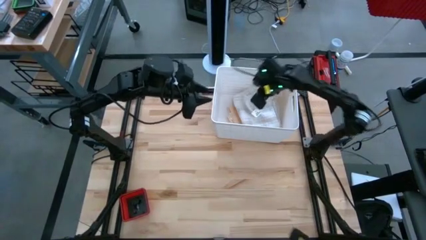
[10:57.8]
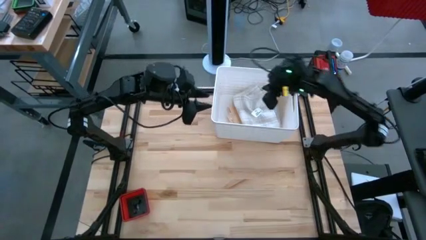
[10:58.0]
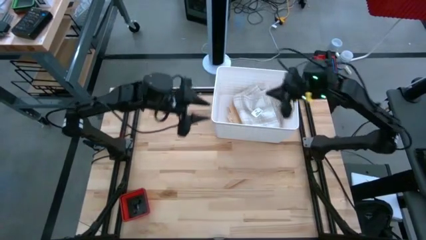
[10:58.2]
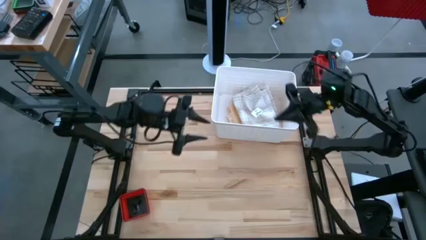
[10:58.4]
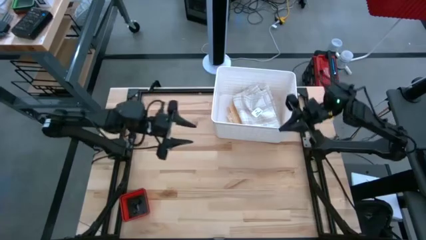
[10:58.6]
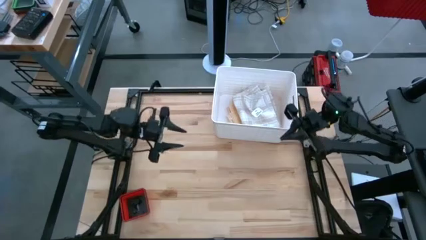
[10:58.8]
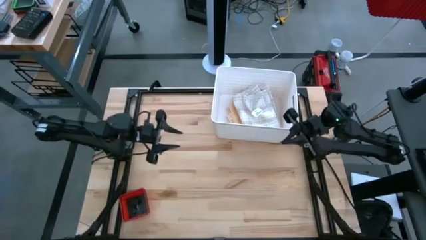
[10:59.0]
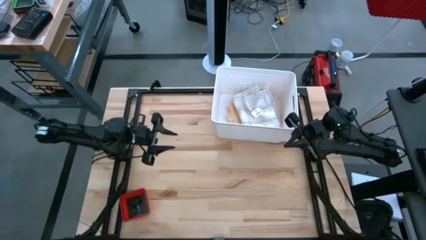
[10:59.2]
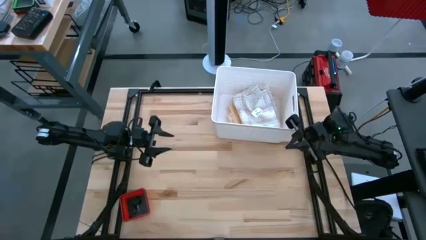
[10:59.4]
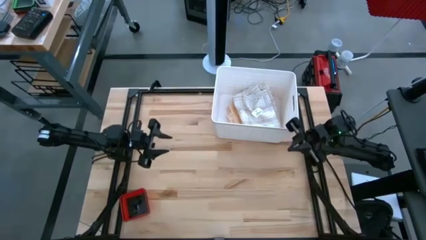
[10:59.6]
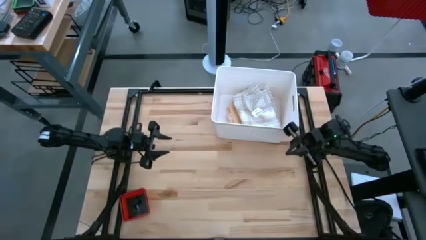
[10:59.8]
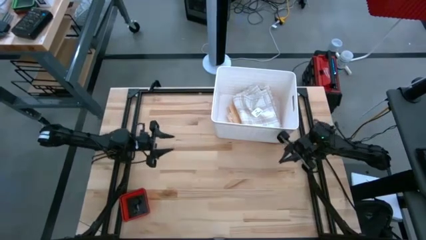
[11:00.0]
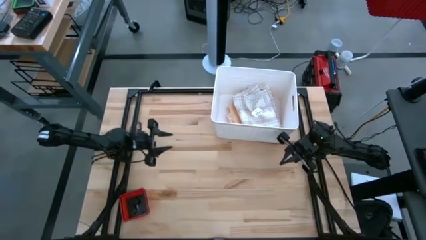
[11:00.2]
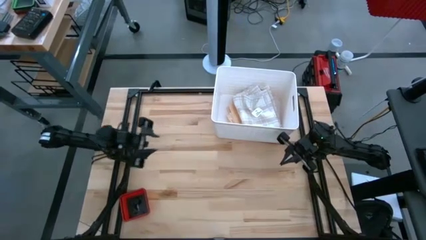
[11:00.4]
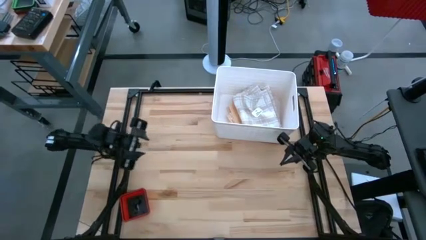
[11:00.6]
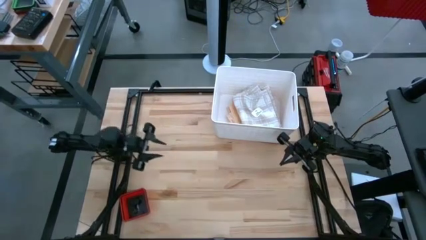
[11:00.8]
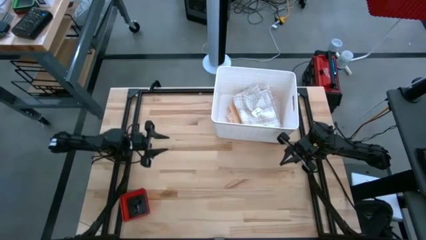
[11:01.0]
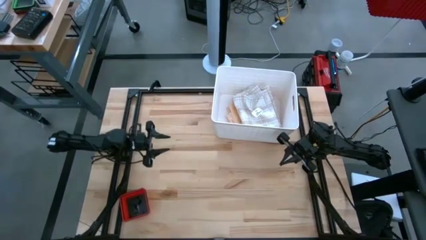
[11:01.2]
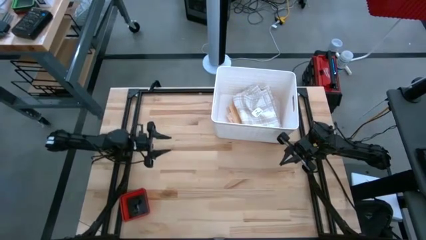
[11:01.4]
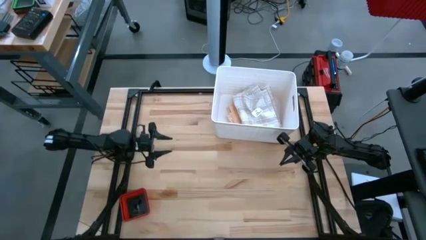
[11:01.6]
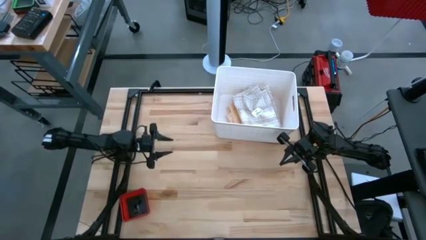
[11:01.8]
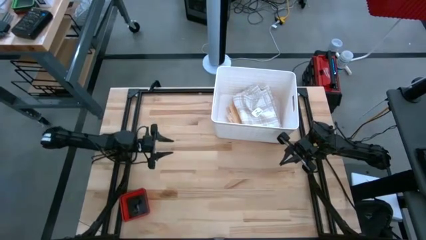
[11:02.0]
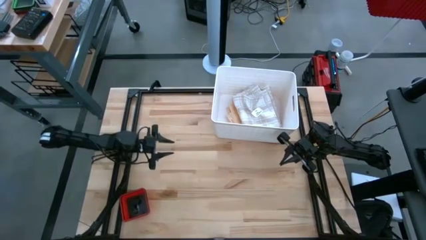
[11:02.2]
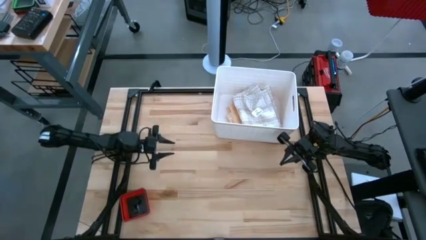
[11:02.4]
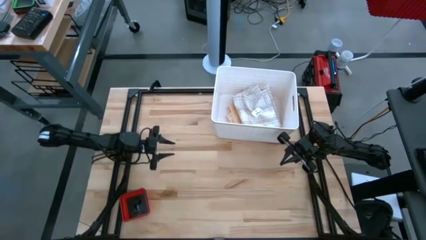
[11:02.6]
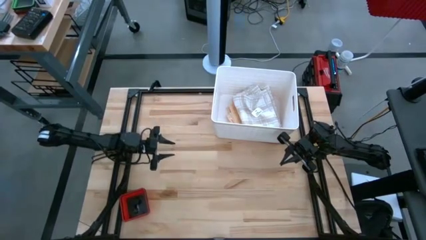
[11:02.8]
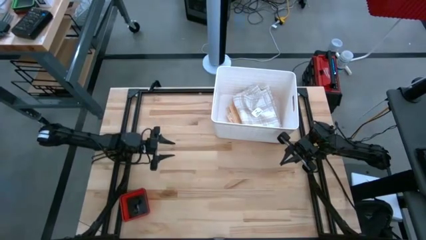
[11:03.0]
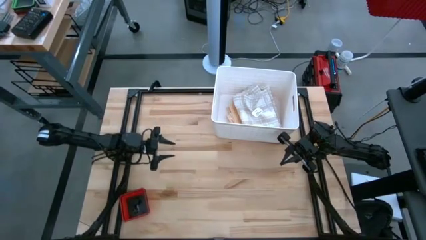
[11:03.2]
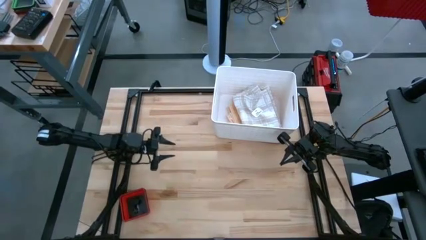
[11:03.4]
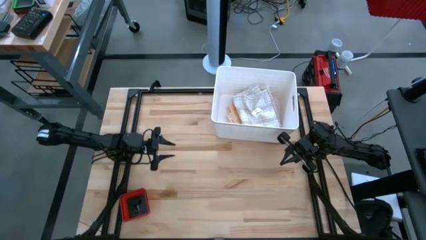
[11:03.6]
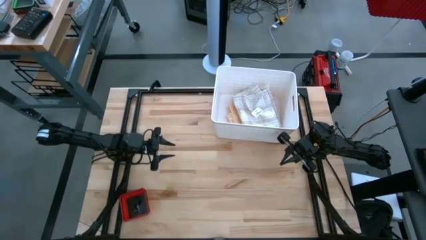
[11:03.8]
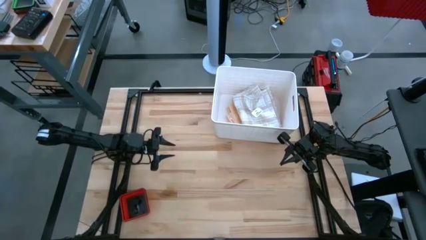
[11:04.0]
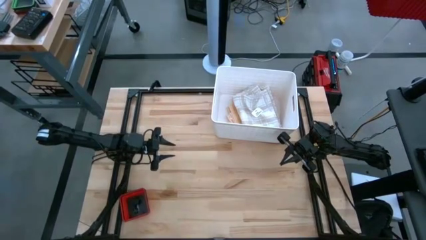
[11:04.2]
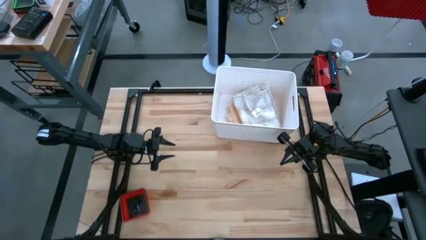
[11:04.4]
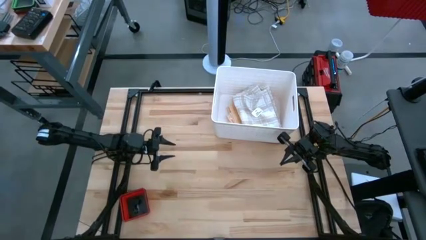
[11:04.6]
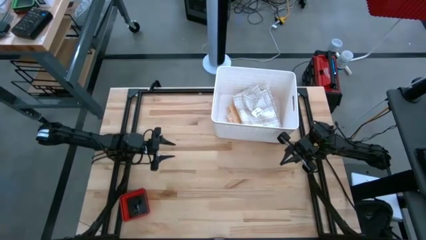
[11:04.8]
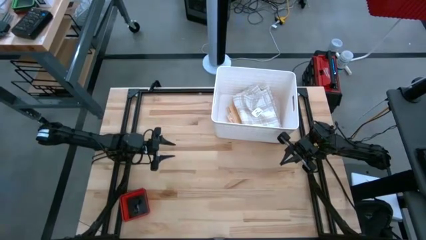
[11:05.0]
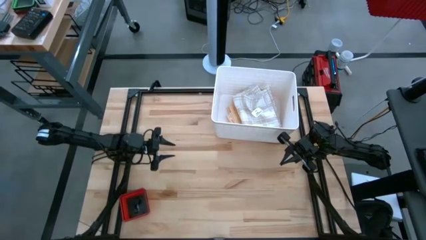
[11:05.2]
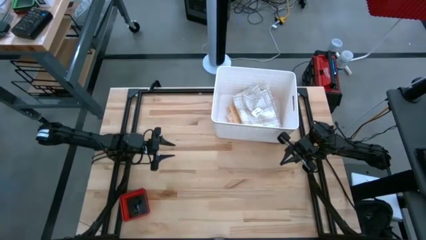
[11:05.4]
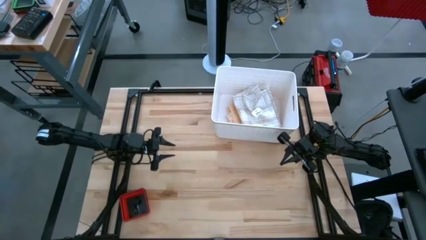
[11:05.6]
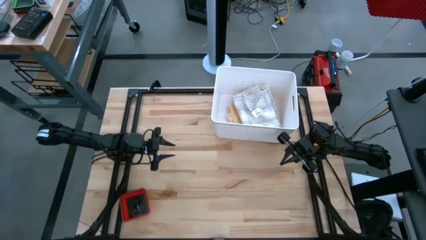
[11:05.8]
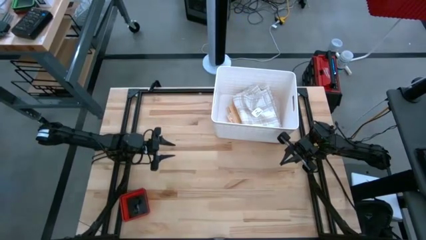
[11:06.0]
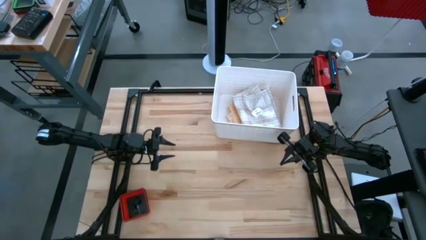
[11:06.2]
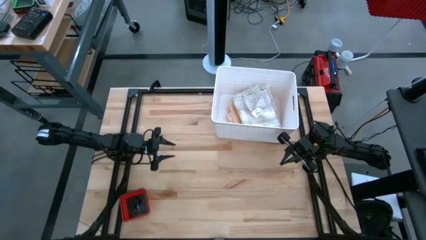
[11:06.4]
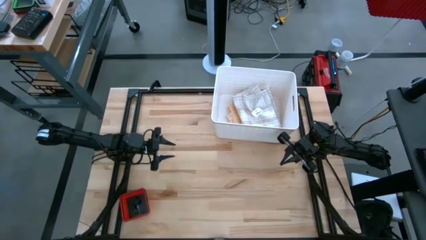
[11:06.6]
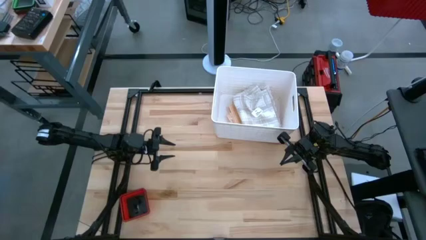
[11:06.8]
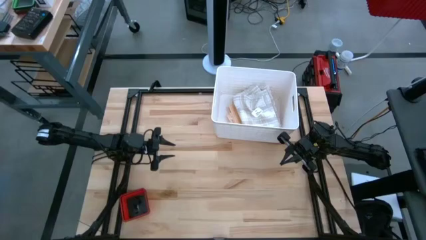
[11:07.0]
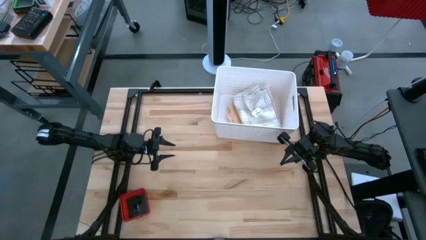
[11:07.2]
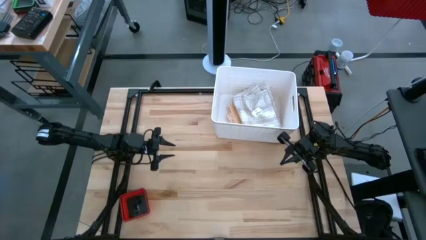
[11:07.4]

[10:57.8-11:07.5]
Task: Fold towel
Return to Home Position

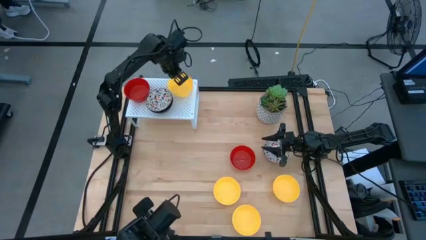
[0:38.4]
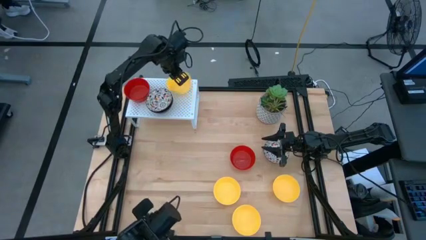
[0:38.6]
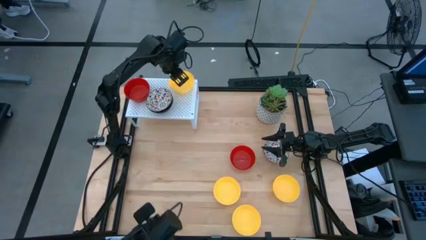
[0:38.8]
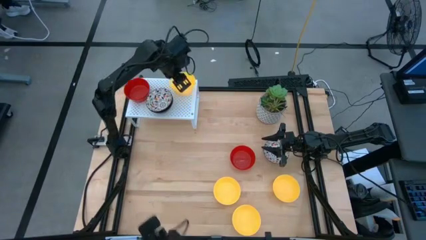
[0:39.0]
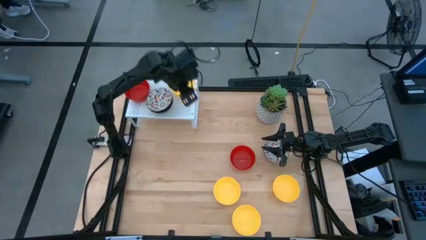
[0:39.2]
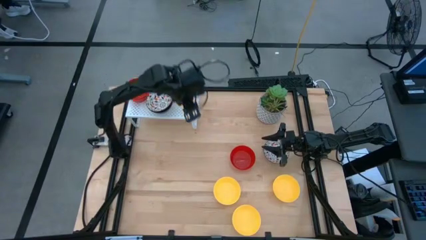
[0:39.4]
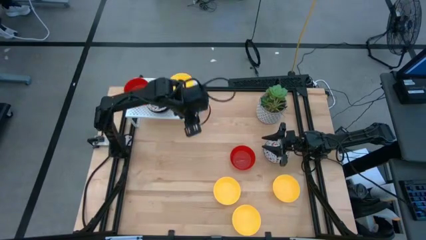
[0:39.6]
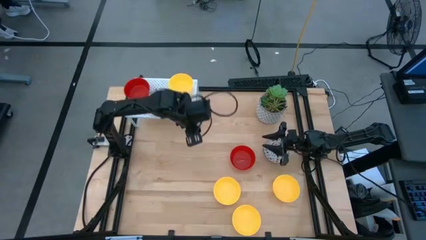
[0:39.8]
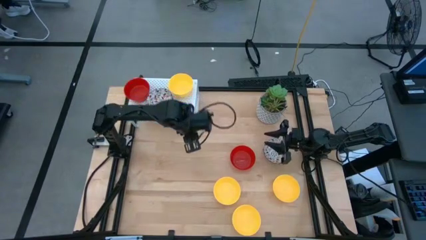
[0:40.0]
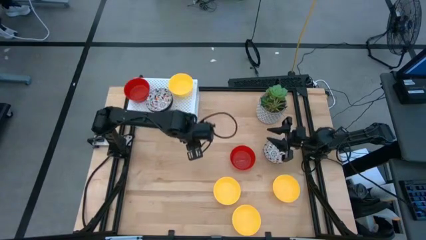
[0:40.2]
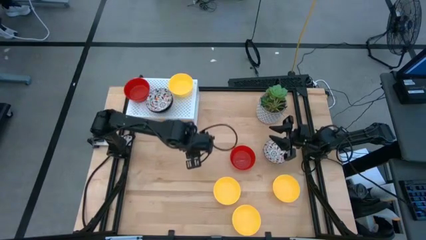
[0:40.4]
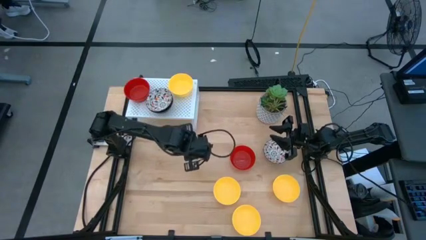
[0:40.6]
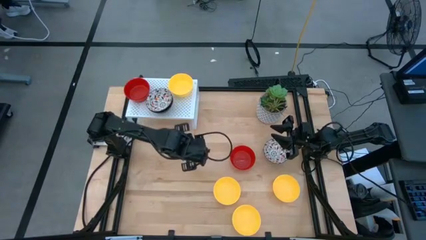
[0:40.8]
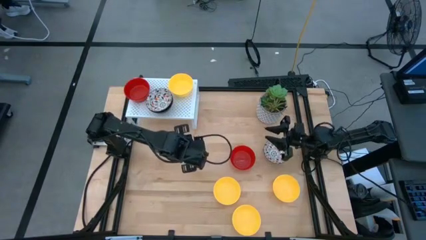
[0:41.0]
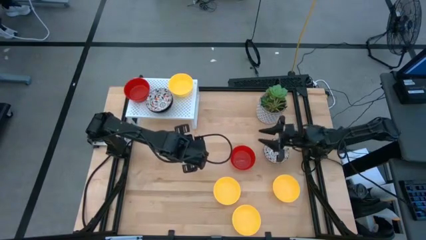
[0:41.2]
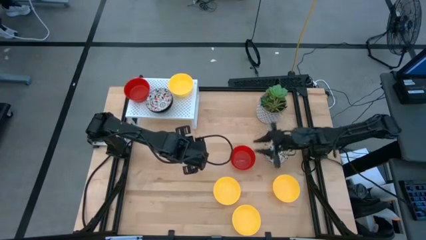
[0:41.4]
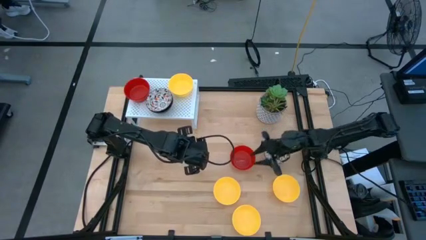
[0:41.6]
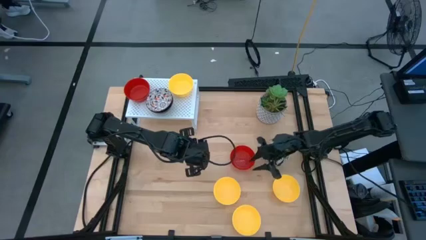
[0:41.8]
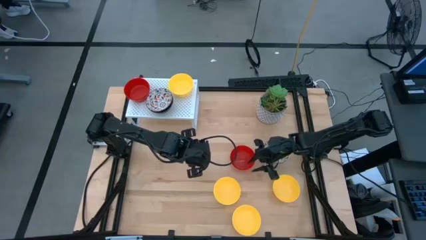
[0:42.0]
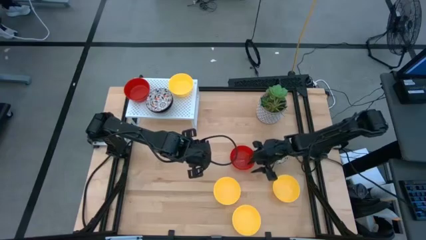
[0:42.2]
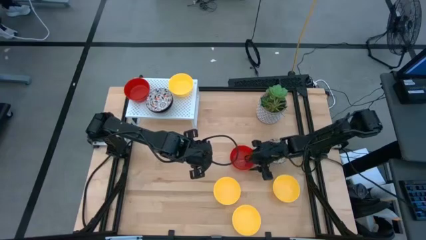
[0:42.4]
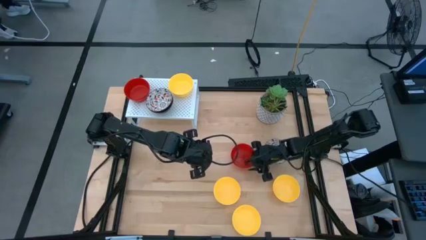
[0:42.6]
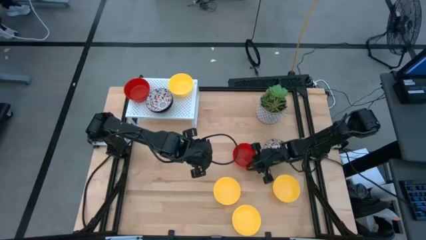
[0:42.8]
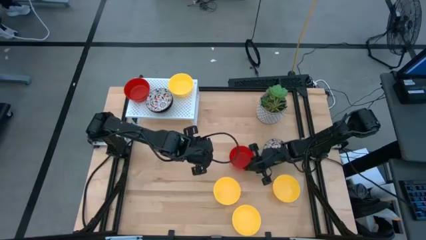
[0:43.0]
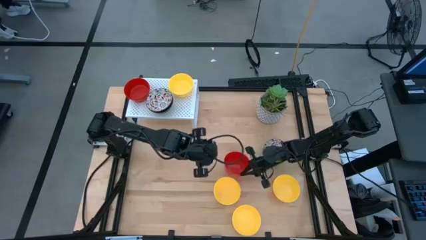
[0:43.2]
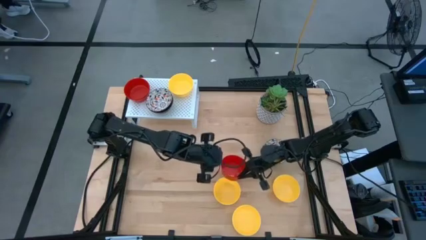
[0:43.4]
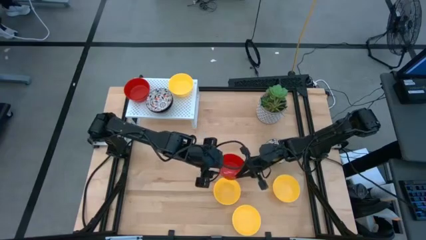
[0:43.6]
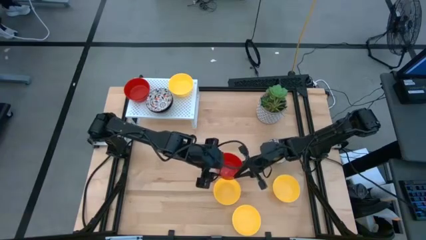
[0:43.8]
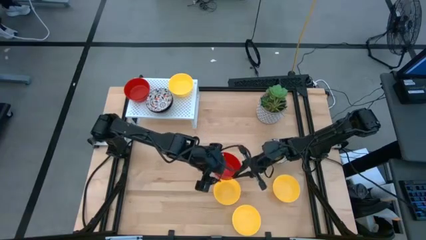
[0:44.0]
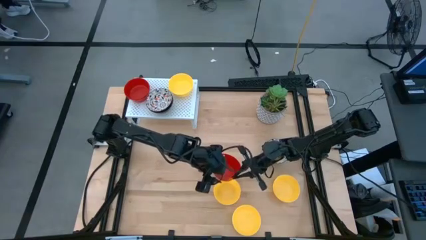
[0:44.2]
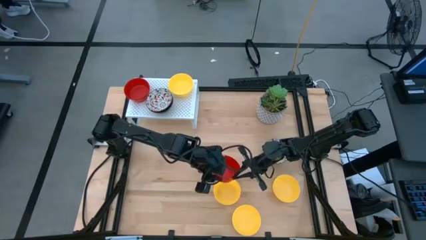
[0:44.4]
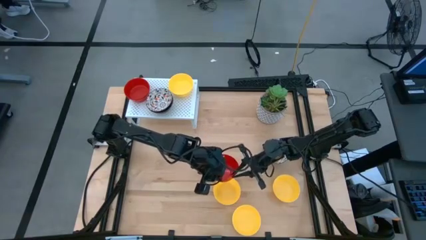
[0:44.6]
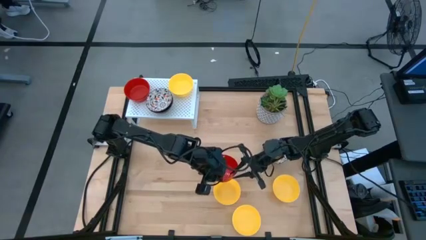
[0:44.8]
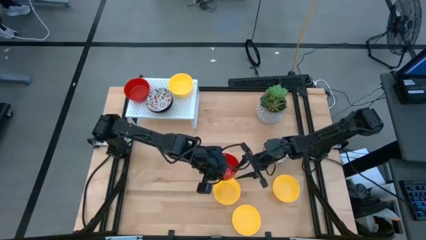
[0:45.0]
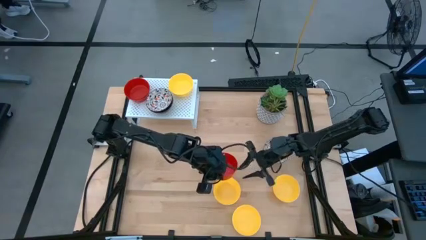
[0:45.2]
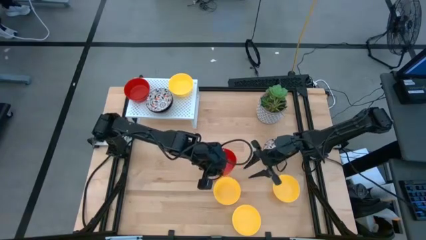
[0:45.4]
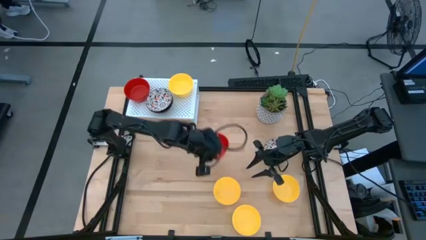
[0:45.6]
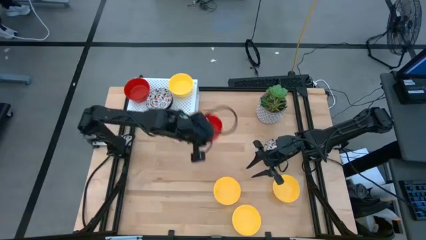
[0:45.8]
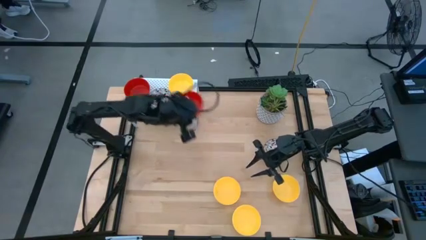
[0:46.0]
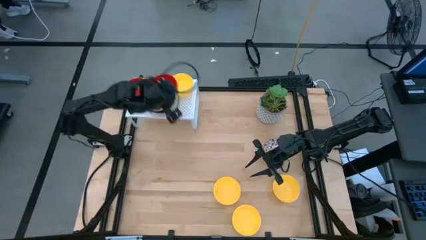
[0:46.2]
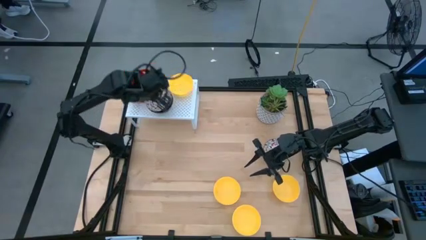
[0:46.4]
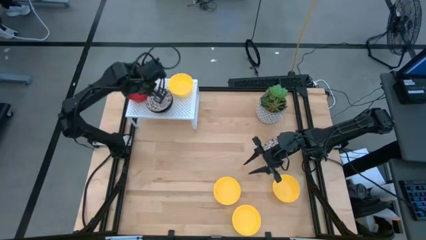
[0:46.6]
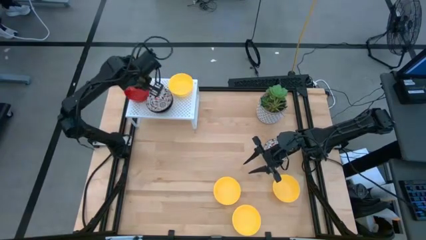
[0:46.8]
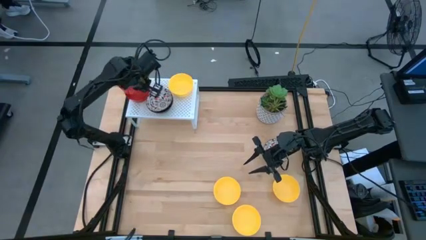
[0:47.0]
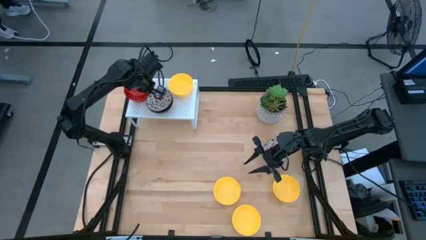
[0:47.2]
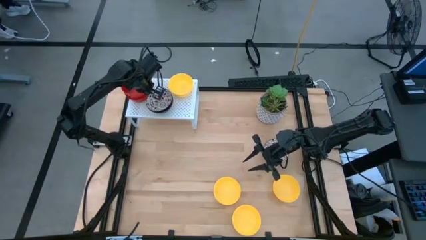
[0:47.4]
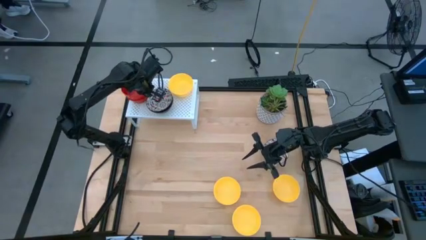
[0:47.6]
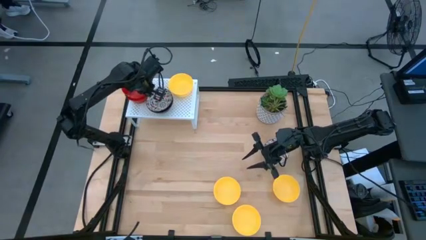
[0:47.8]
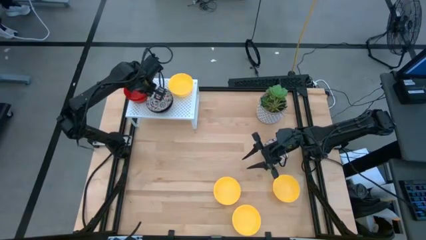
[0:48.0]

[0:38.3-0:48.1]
Task: Pick & Place Mini bowls
Stack the red bowl on top of the red bowl on the shelf
